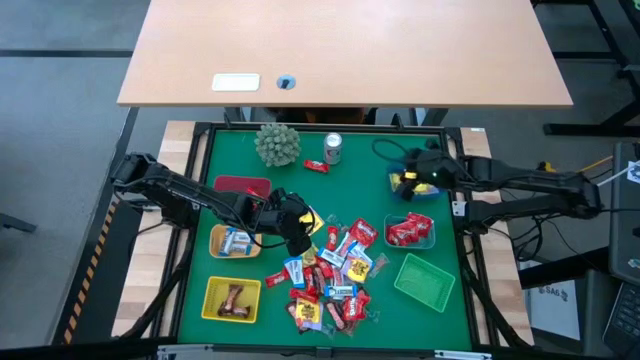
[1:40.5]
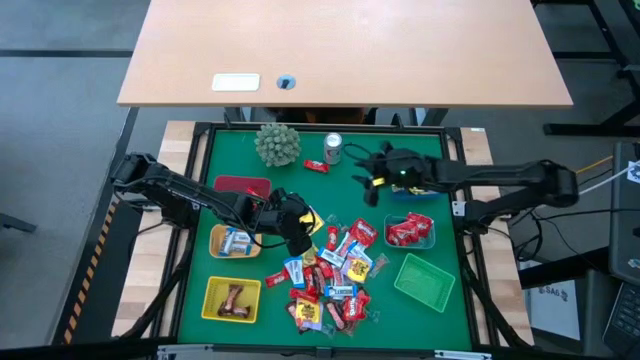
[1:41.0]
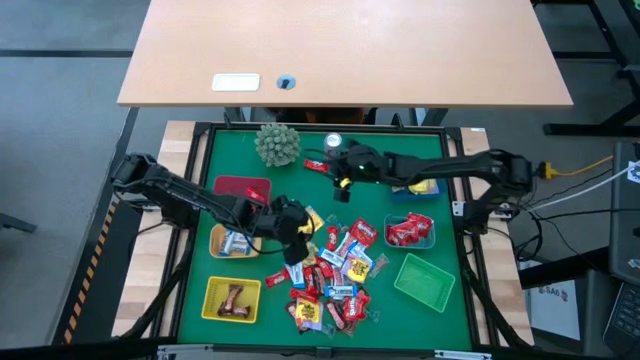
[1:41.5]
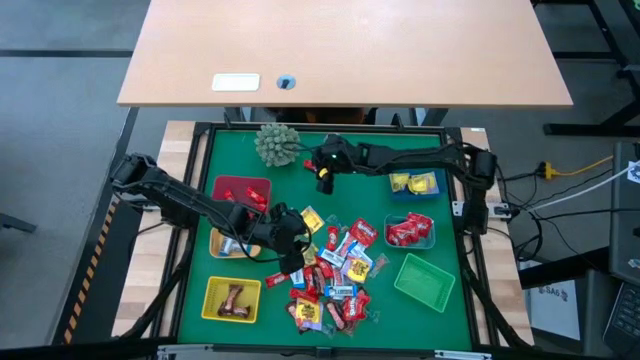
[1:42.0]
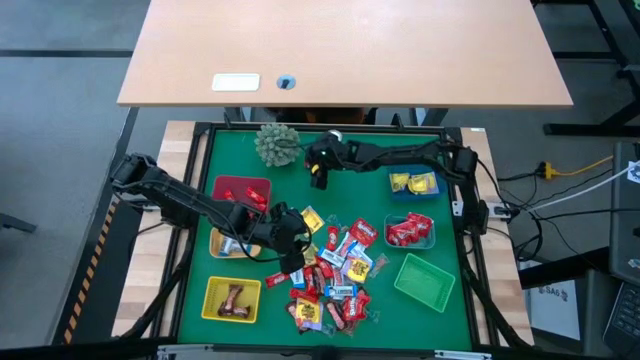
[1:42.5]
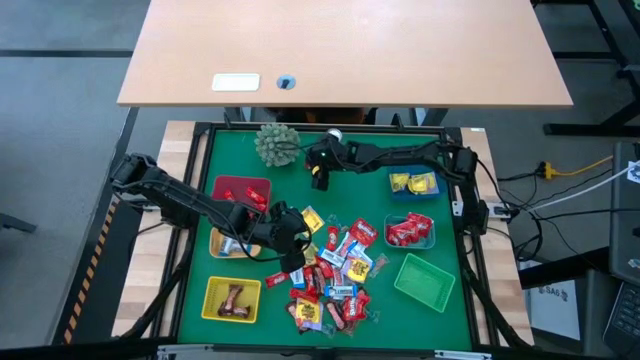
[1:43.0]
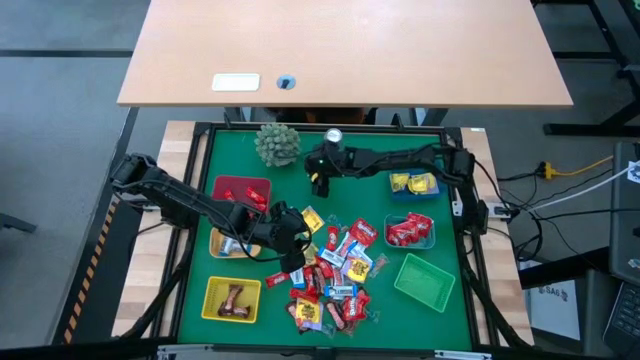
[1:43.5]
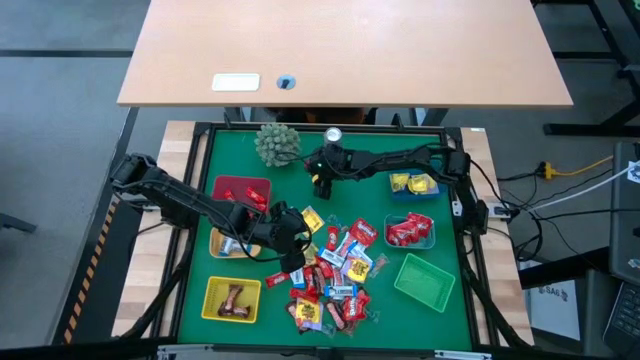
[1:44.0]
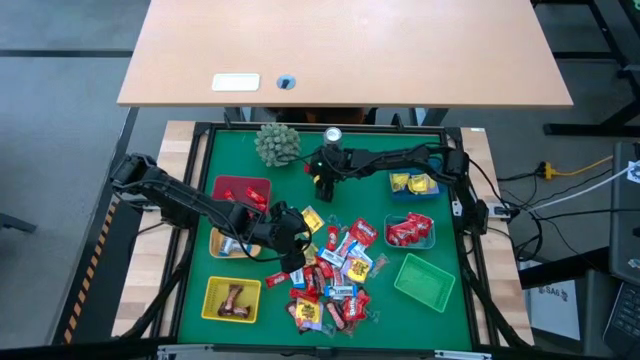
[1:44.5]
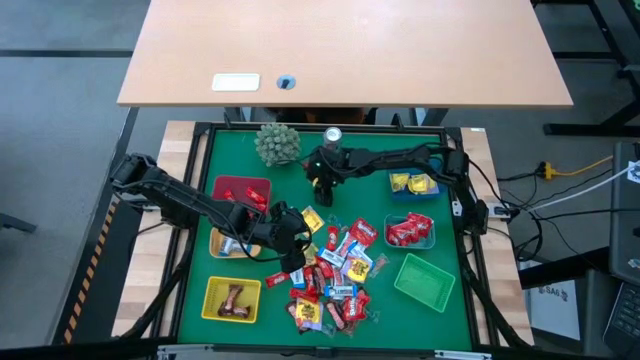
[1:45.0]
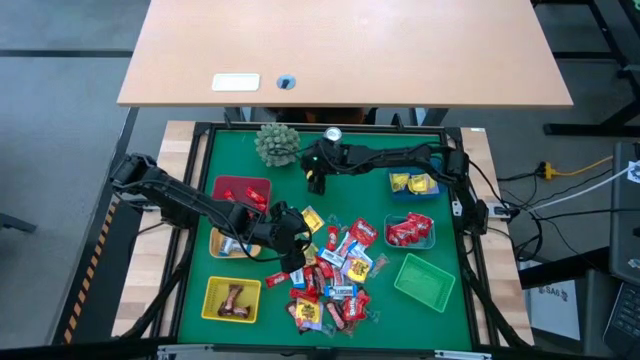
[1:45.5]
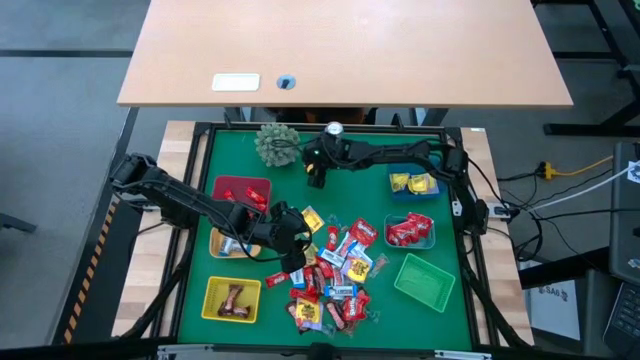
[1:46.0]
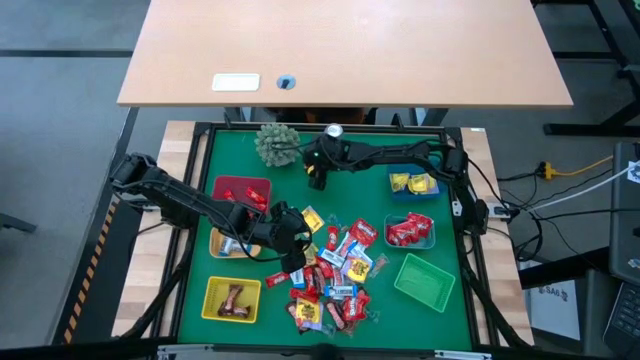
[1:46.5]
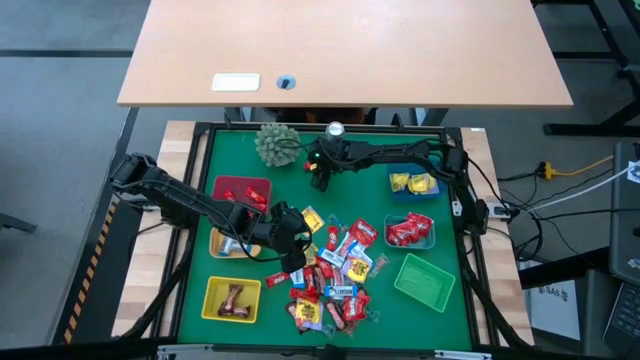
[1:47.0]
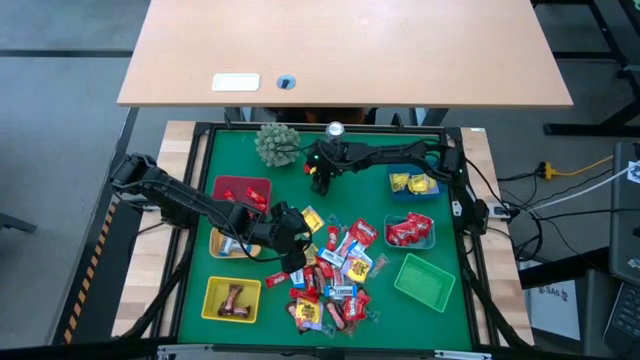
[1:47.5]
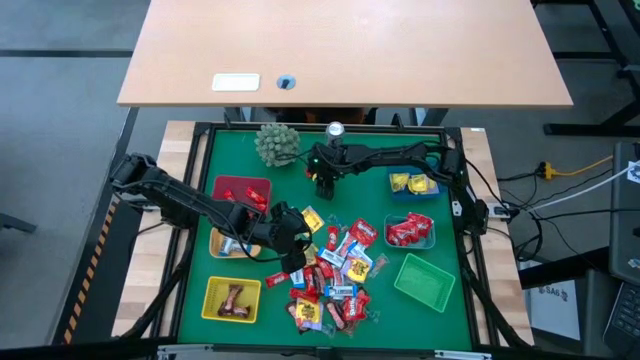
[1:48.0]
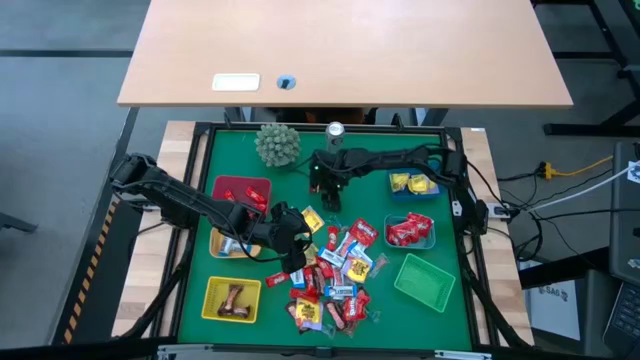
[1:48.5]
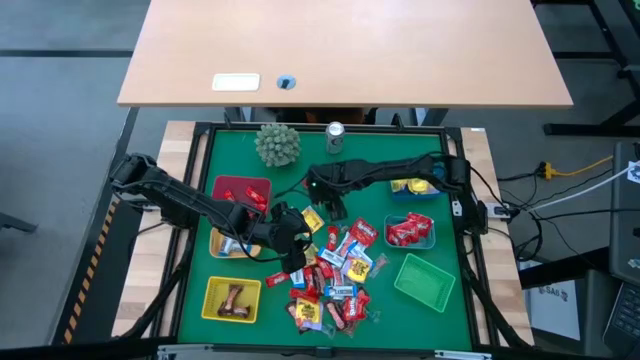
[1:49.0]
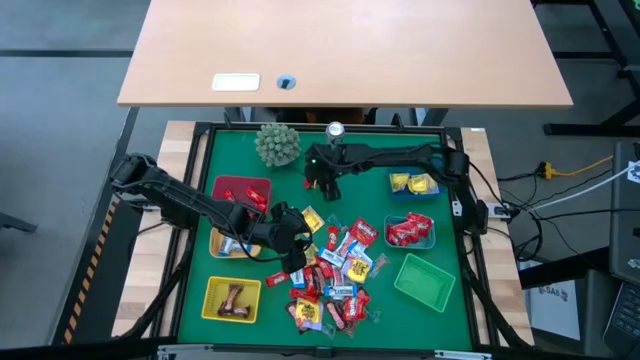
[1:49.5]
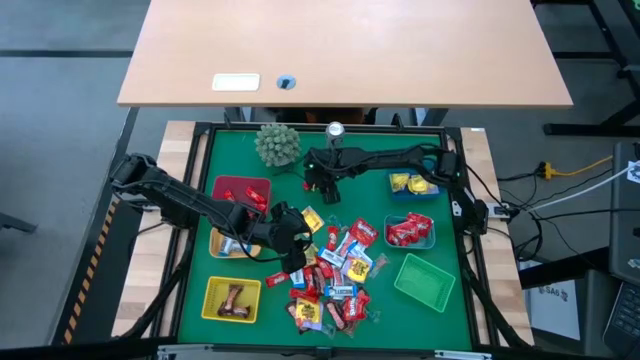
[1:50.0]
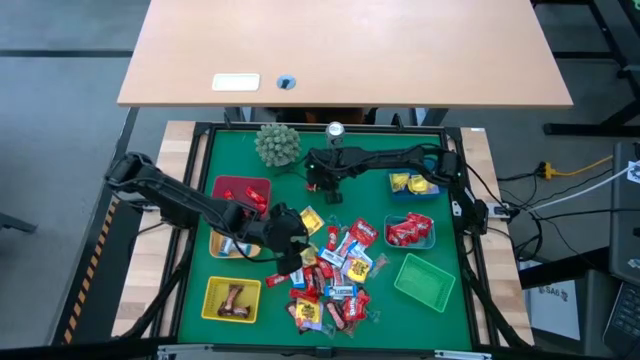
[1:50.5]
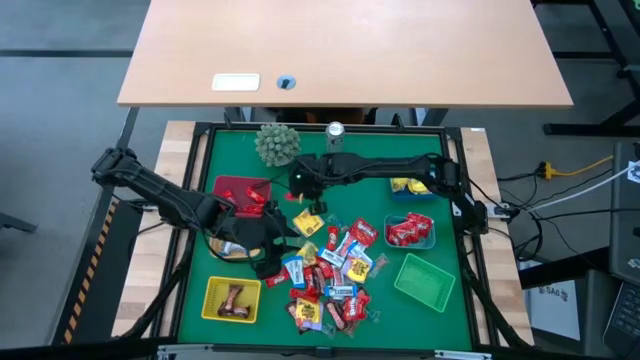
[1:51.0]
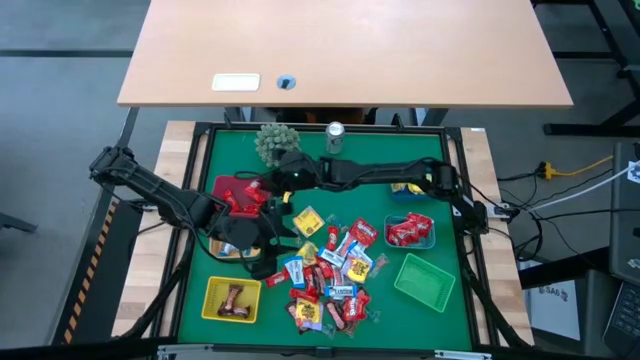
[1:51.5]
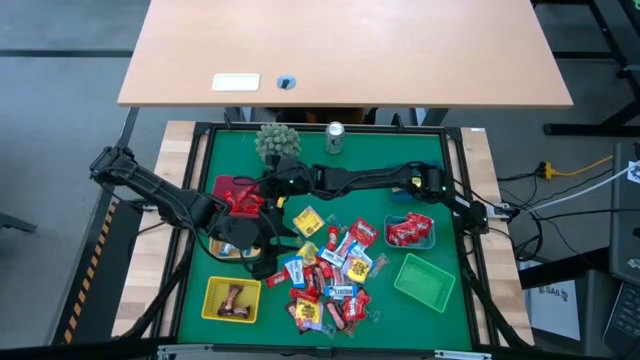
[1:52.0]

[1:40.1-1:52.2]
Task: Sort candy
Put the red chocolate bar into the red bin

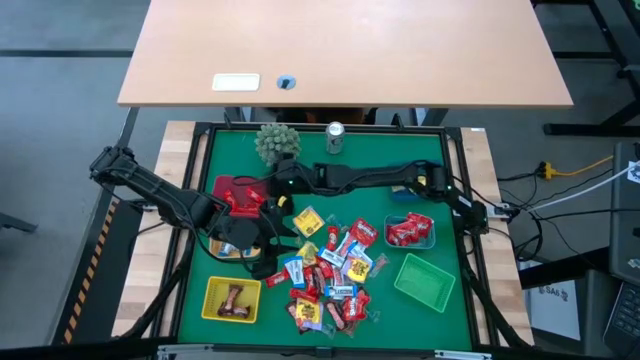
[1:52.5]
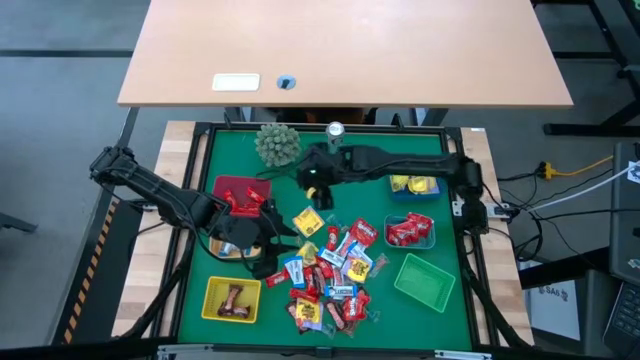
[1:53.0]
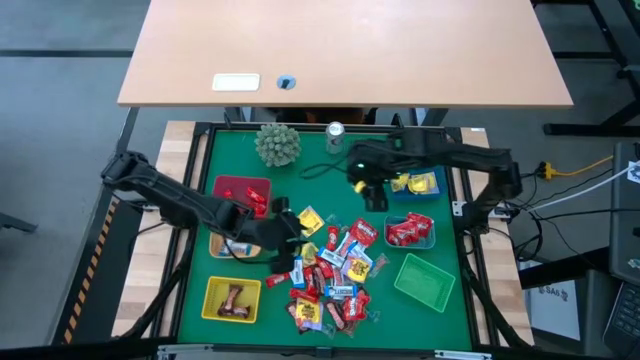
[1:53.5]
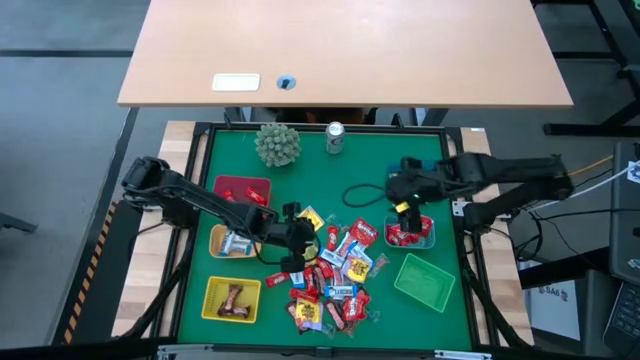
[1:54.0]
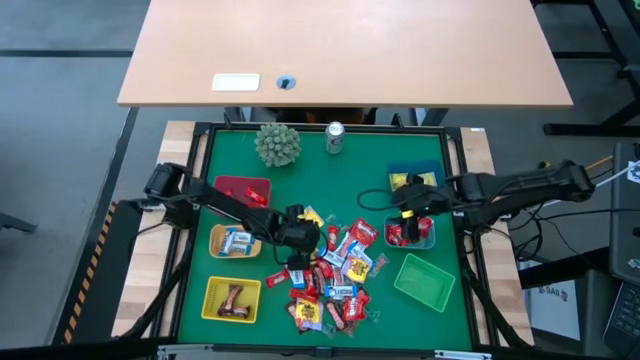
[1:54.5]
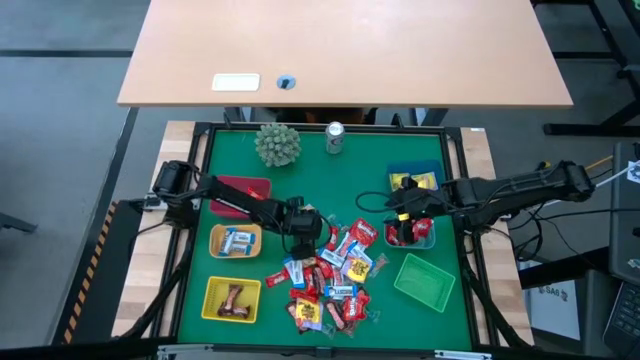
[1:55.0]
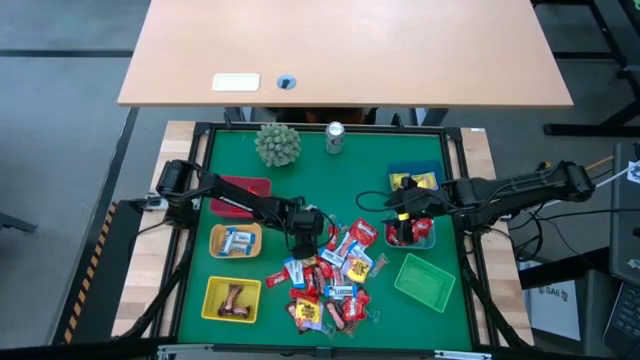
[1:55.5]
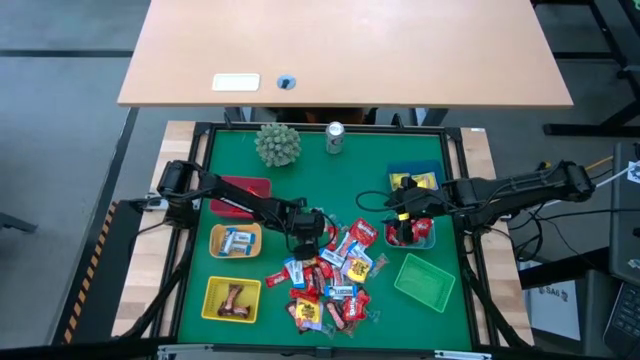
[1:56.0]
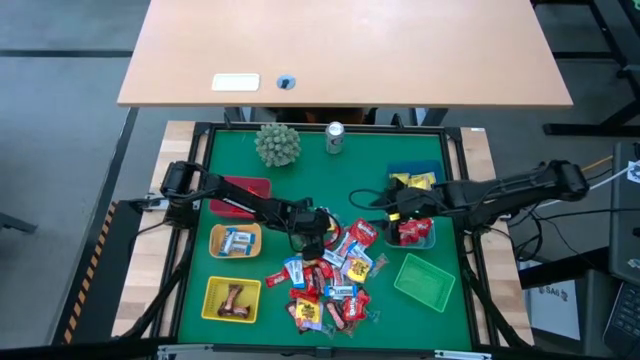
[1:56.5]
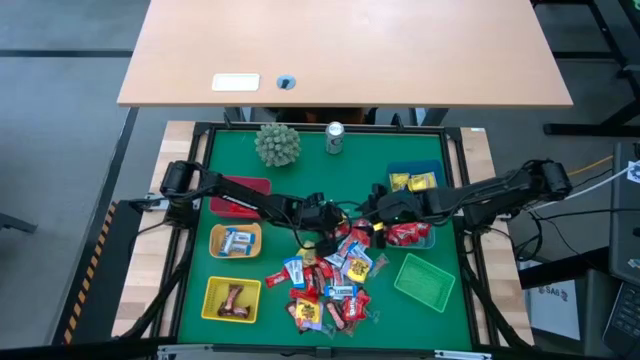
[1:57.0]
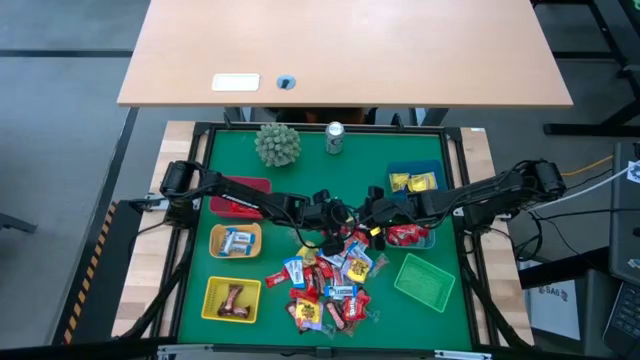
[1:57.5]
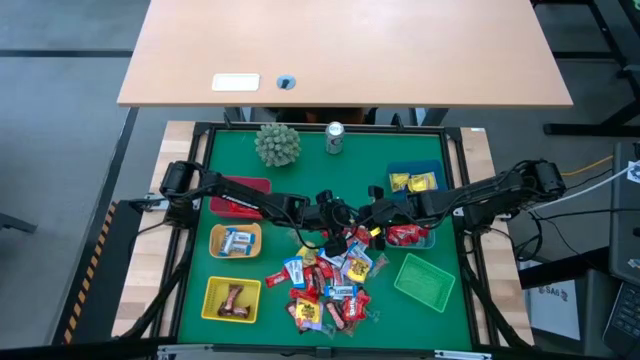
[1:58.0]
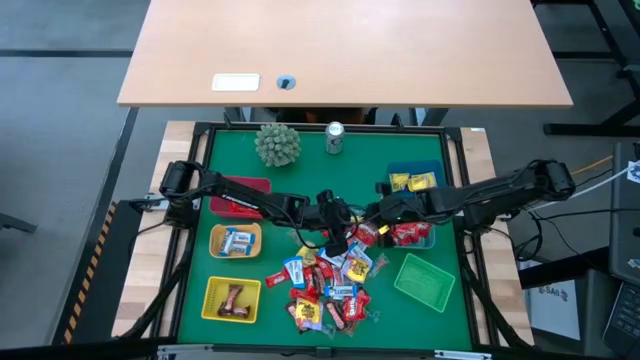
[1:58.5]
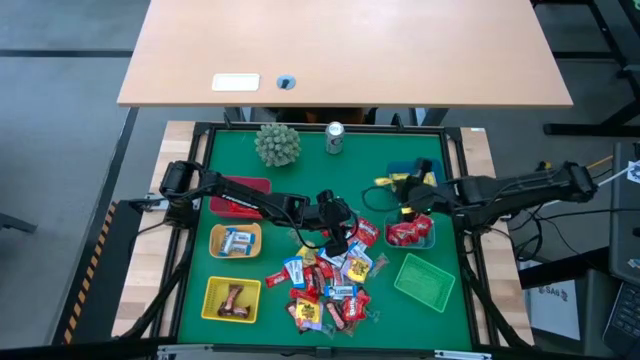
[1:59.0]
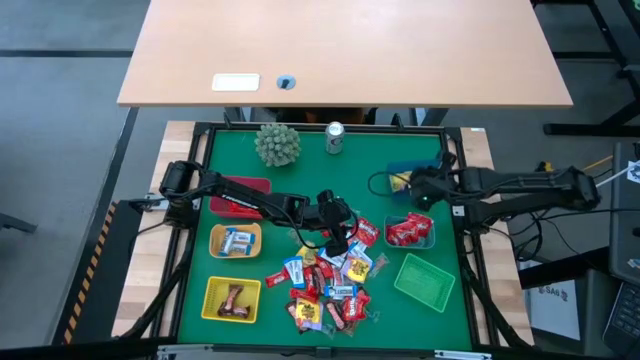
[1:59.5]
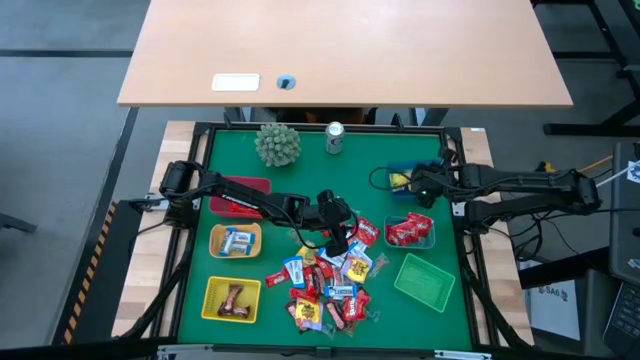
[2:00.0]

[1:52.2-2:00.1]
Put the yellow candy into the dark blue bin

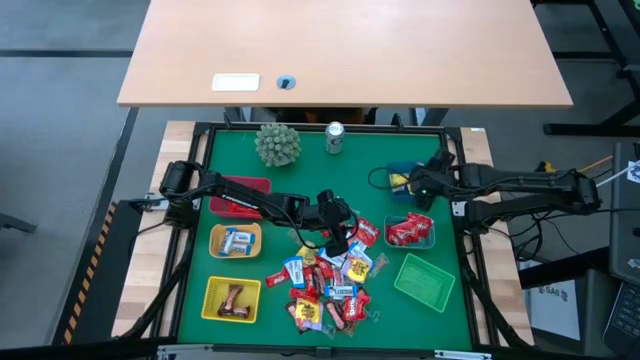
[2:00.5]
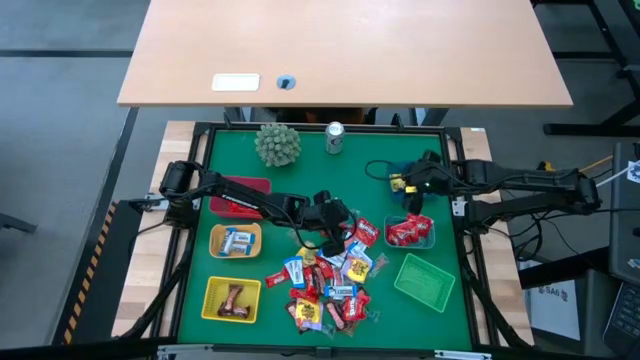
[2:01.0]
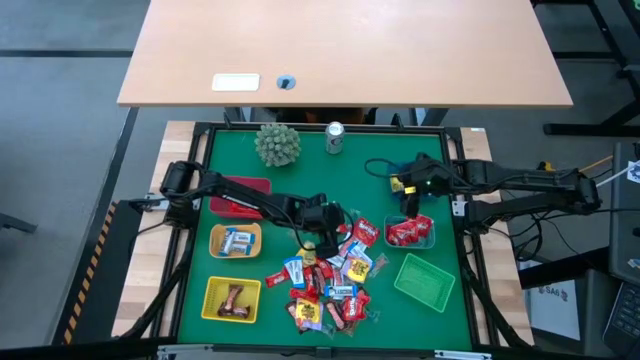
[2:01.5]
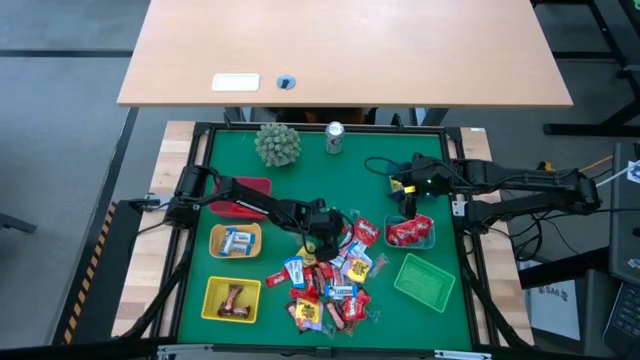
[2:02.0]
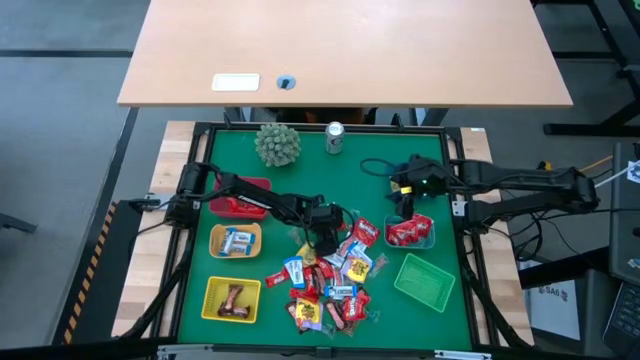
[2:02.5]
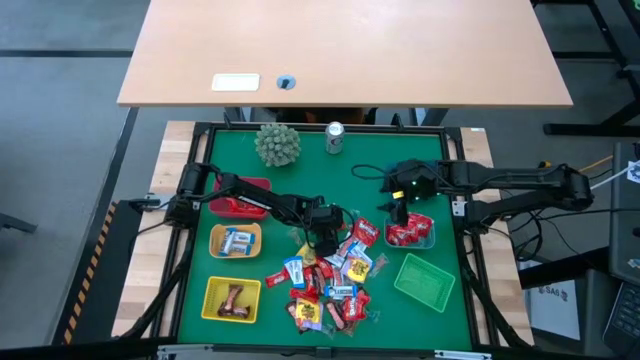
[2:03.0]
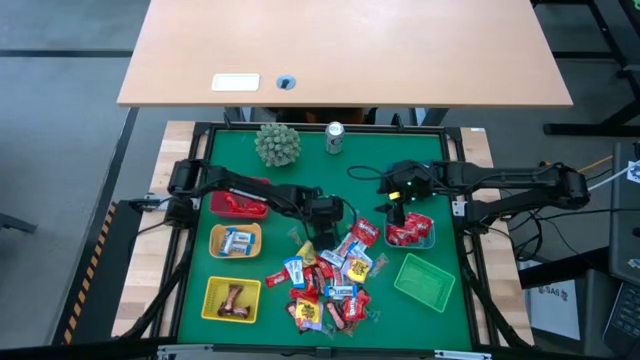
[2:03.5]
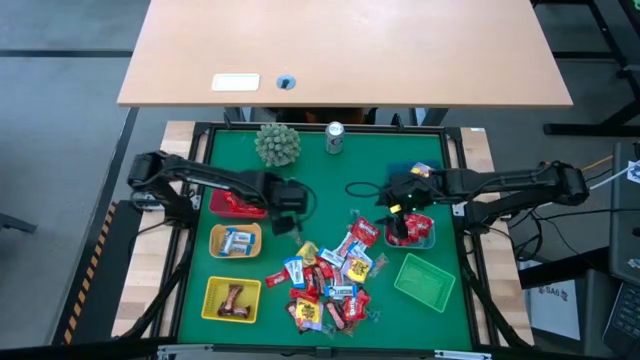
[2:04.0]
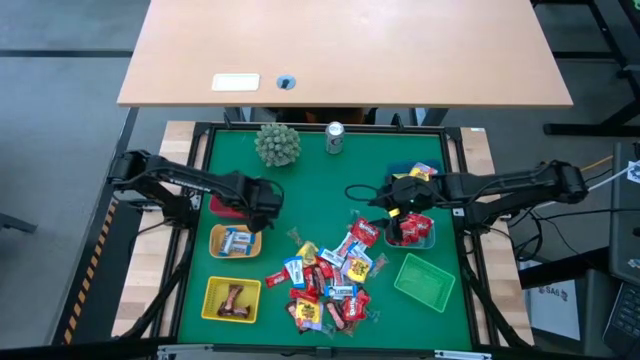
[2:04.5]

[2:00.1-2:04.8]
Put the red chocolate bar into the red bin
